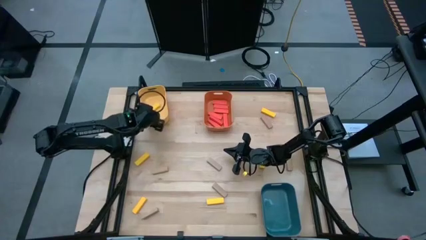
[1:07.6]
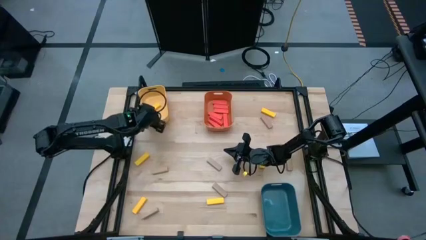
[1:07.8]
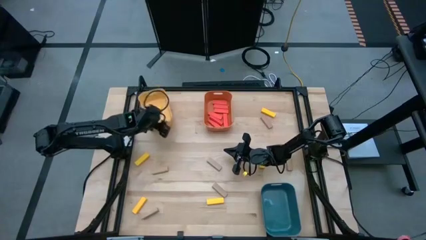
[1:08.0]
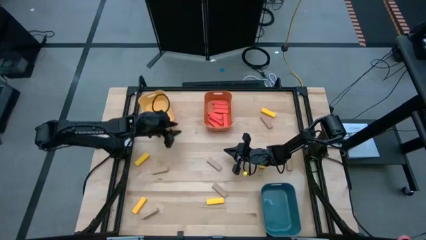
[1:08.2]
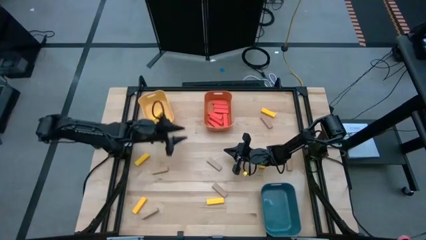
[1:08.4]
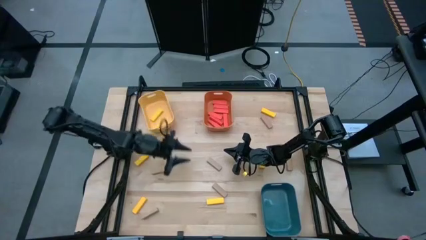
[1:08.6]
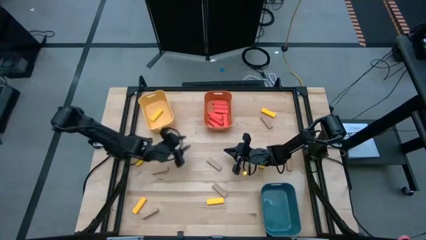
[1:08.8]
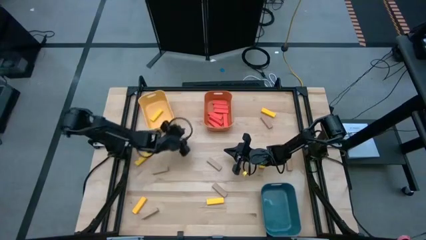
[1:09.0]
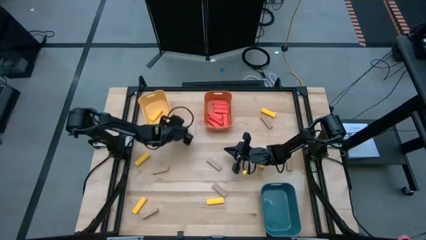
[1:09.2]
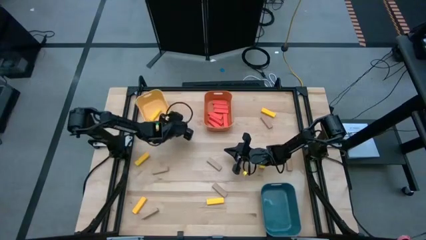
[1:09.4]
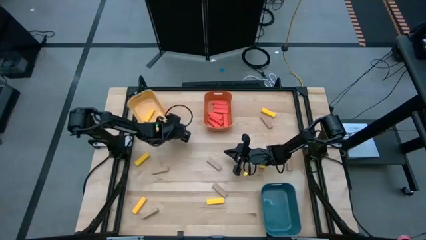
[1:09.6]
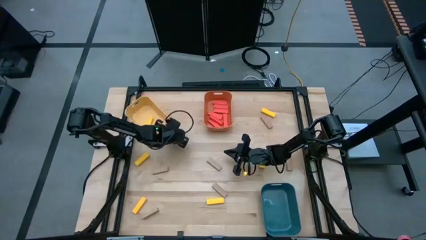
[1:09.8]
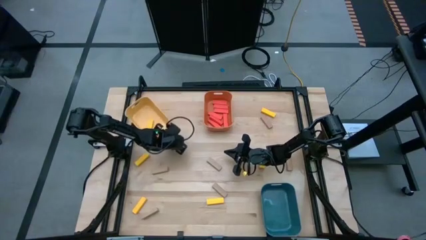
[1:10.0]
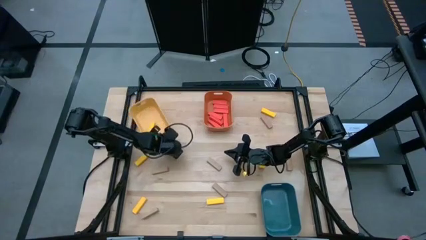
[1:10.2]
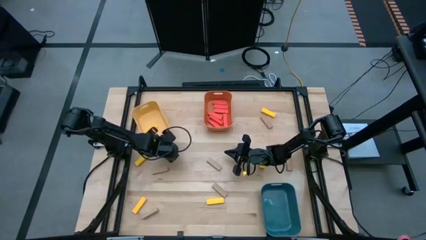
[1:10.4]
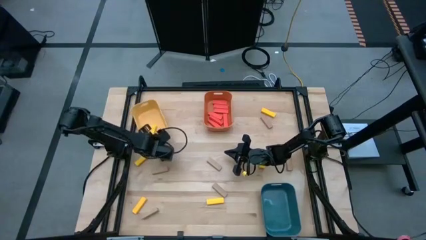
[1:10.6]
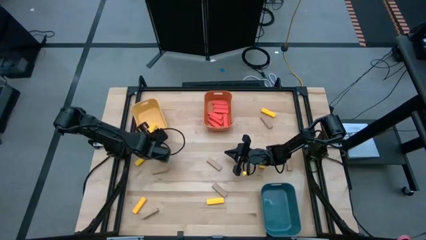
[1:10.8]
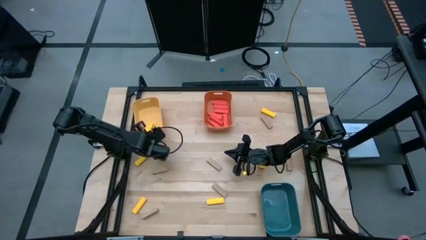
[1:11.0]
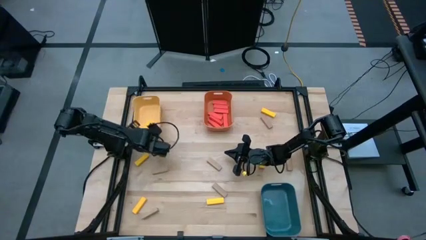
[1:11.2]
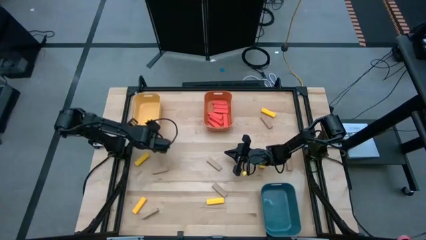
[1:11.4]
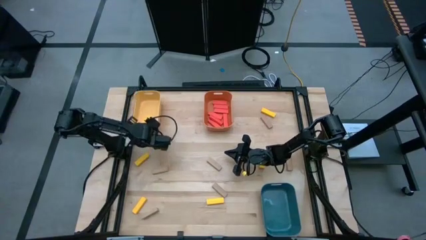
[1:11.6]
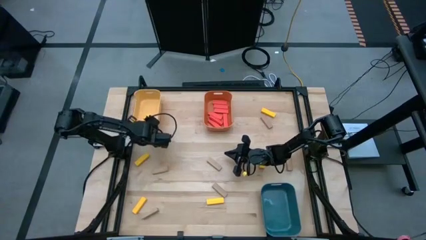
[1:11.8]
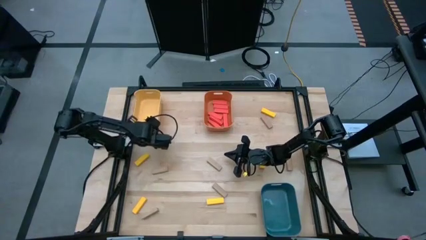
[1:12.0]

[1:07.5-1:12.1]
Task: Sort blocks
Adjust the yellow bin

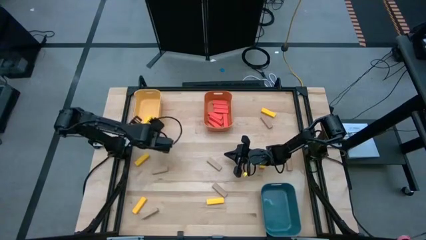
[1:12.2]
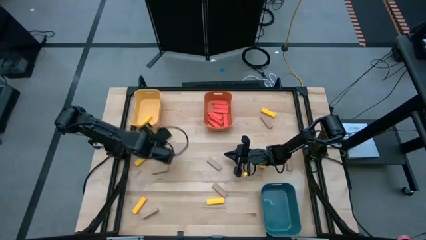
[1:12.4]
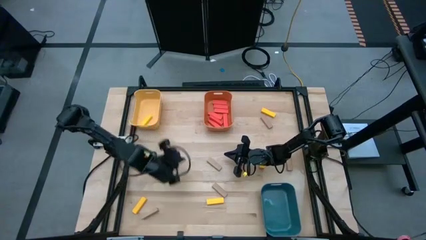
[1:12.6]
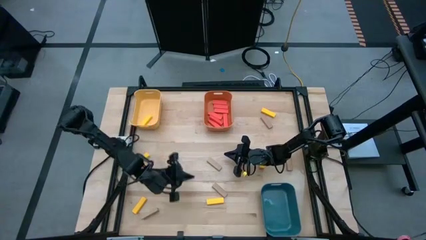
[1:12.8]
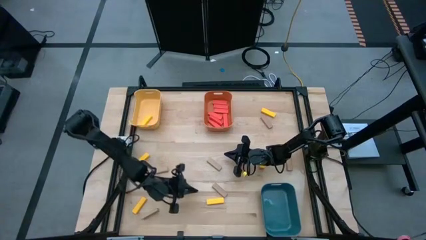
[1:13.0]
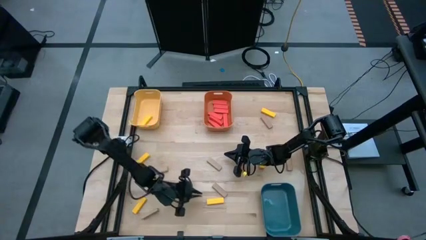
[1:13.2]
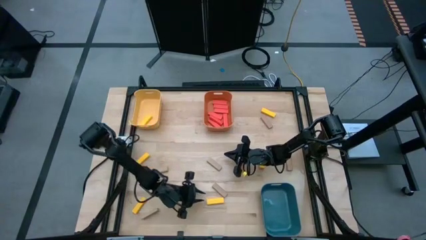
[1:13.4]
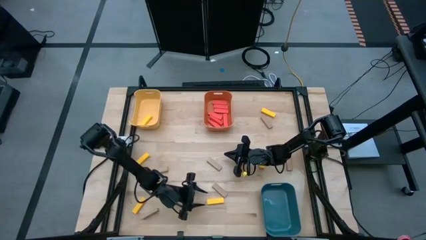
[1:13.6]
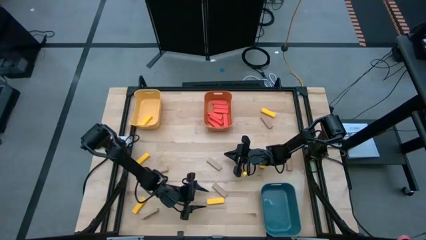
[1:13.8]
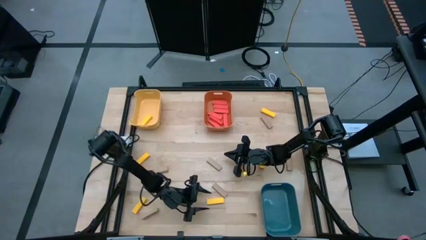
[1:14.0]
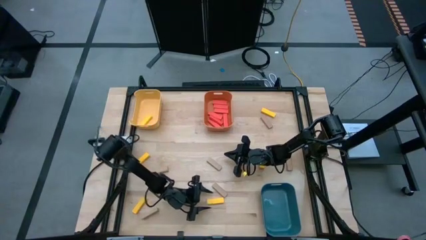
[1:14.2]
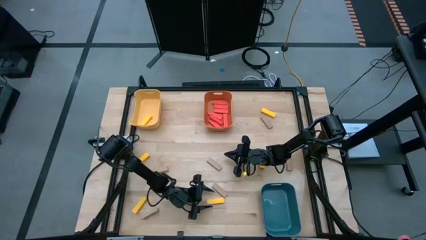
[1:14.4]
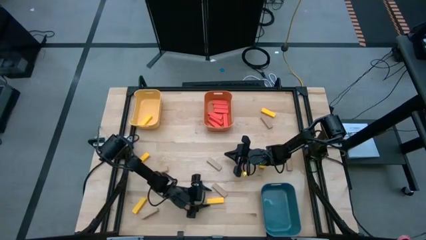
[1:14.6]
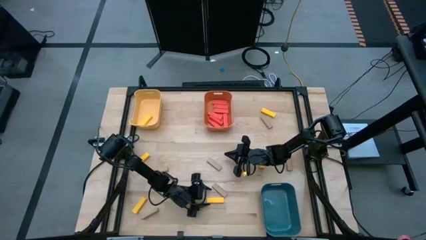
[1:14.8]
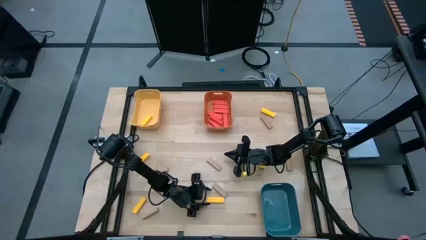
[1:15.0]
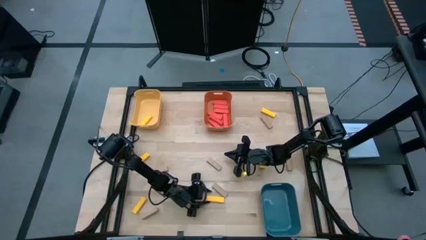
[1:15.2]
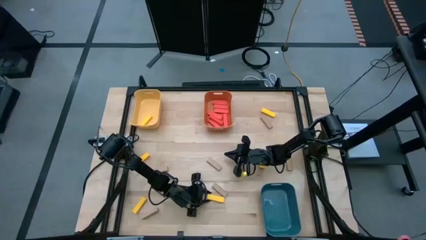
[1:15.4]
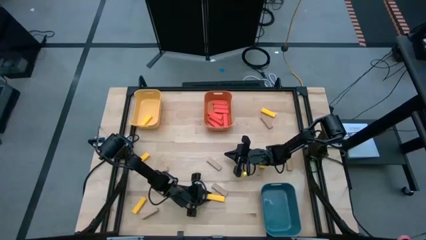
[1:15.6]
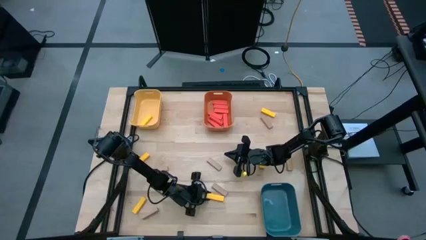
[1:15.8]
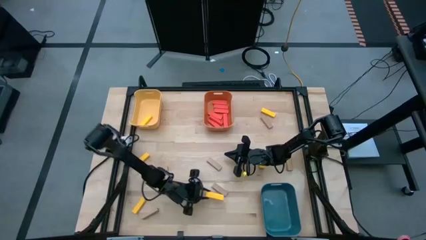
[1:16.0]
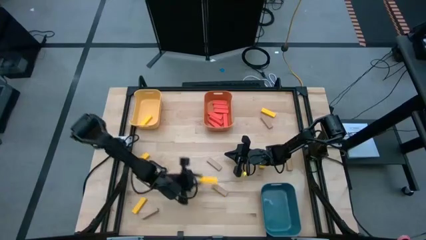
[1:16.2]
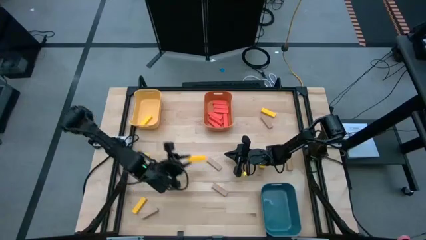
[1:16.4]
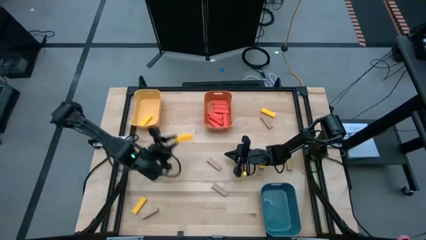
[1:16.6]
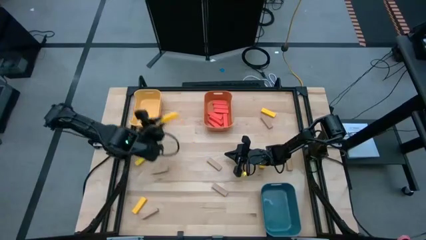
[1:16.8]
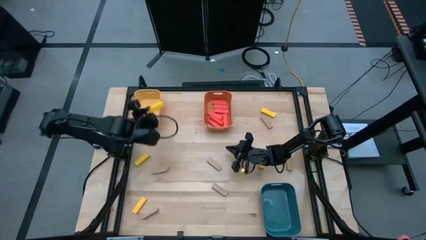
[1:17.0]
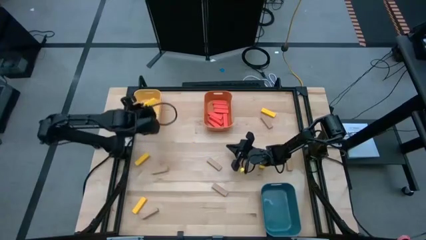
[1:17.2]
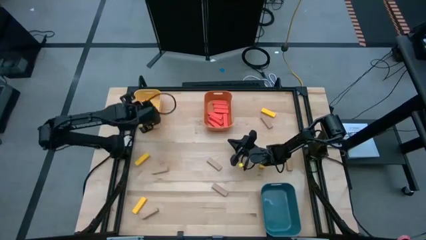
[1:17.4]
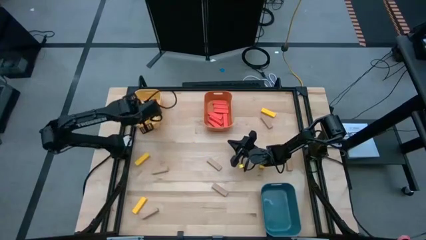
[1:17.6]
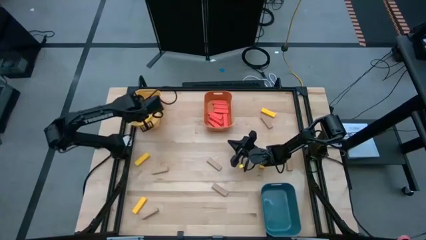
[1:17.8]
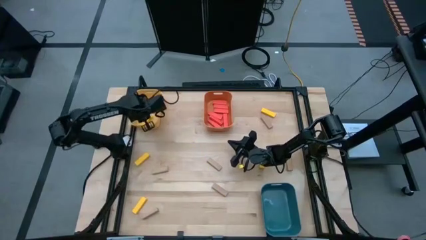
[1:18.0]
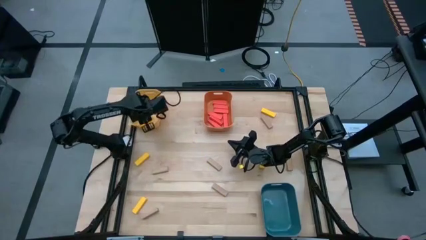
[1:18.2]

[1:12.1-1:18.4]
Put the yellow block into the yellow bin

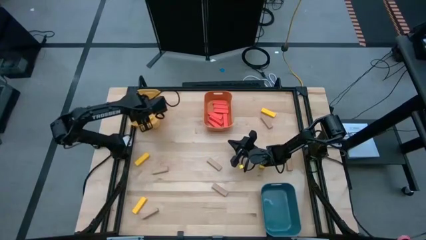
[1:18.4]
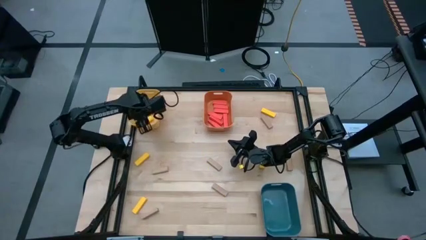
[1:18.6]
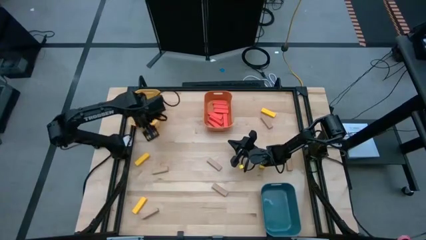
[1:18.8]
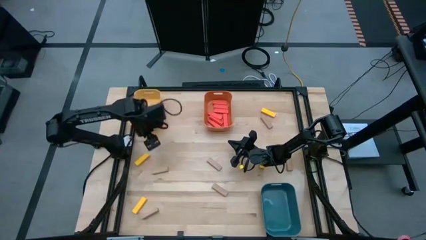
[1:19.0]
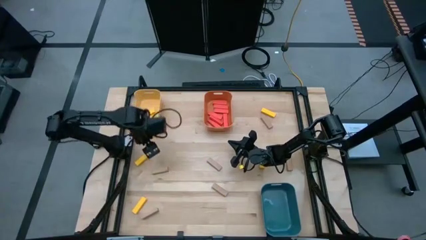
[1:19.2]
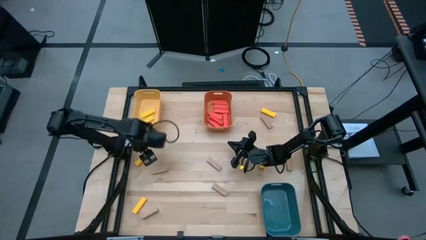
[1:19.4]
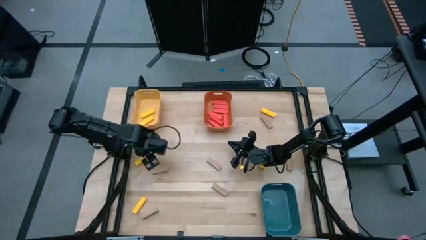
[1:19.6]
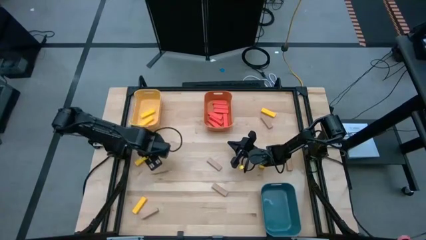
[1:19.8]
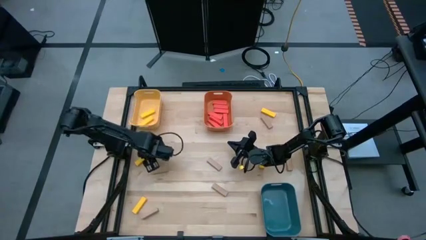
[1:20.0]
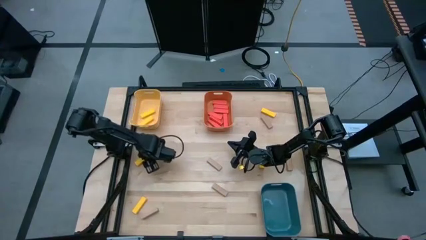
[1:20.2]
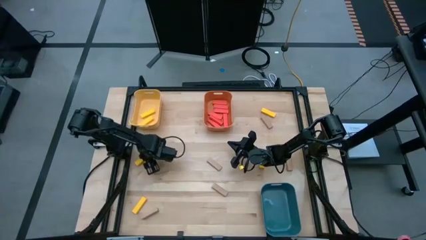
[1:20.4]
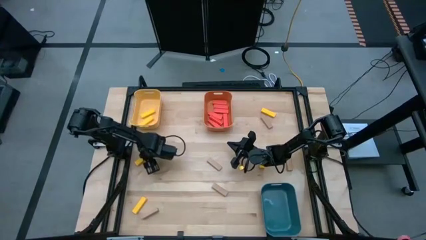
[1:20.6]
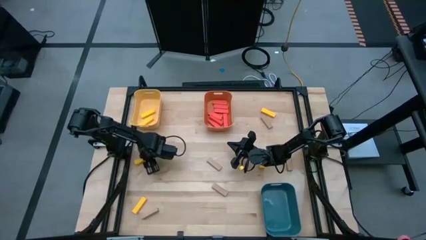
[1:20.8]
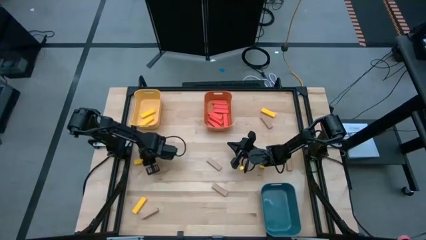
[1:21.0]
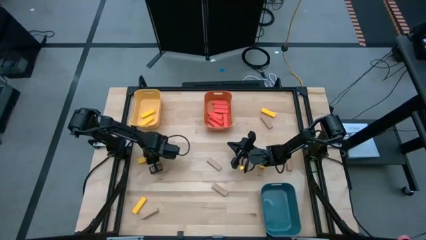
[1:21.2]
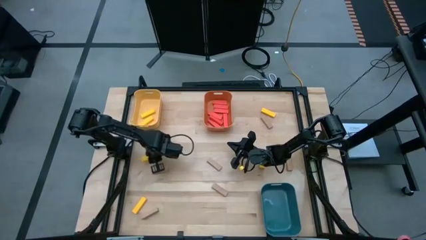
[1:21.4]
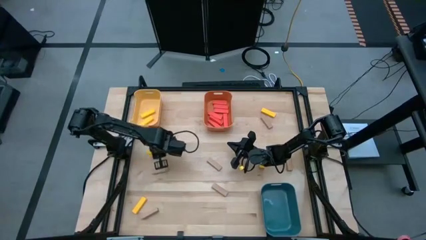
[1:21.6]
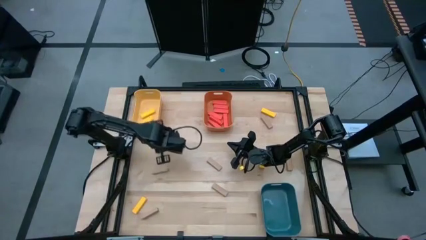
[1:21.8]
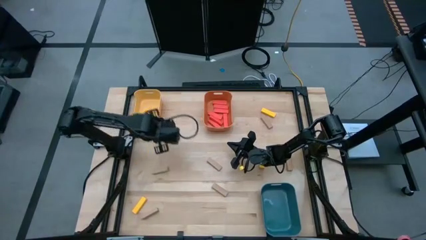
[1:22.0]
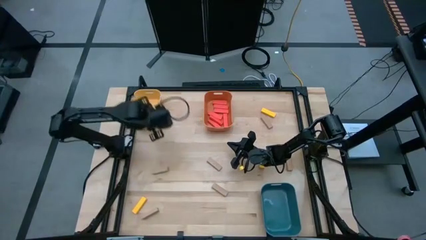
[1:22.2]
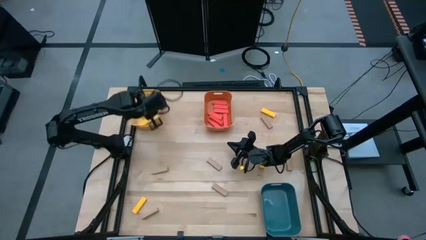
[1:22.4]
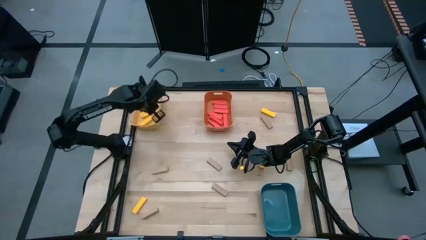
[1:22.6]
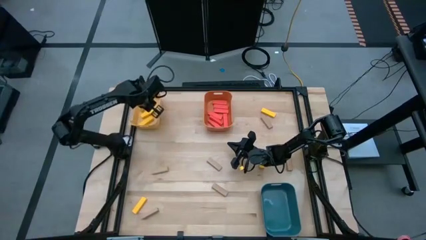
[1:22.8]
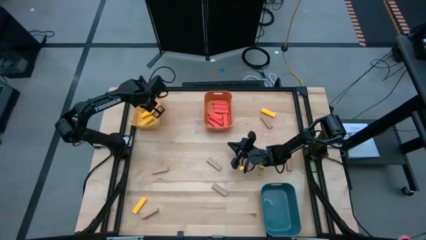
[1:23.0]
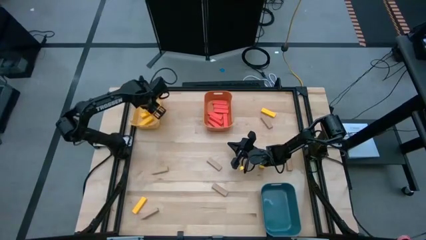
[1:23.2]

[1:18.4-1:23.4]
Put the yellow block into the yellow bin
